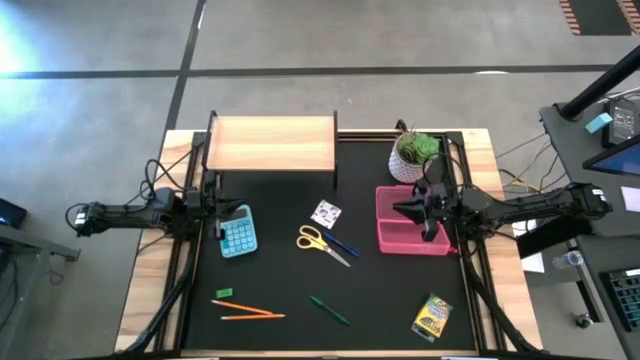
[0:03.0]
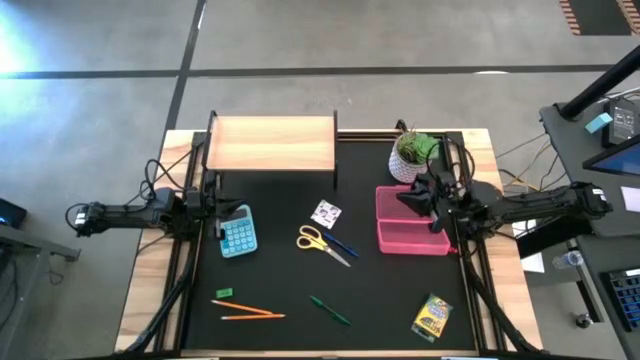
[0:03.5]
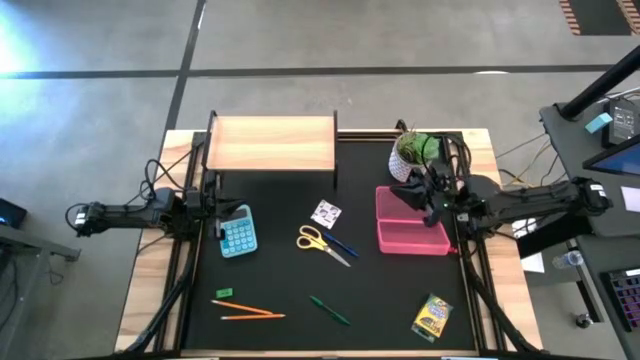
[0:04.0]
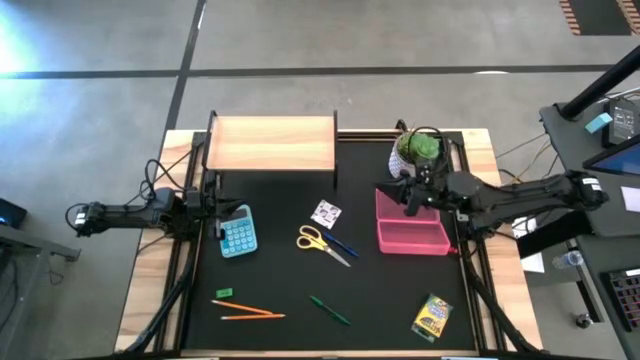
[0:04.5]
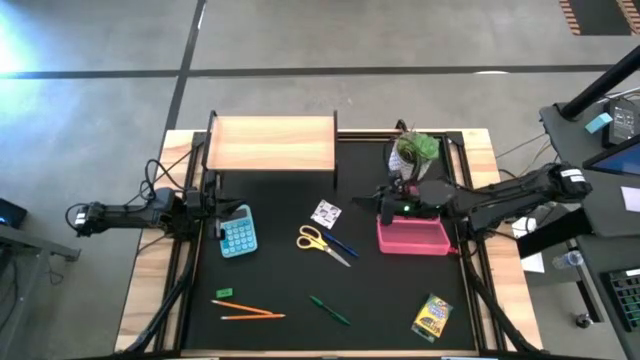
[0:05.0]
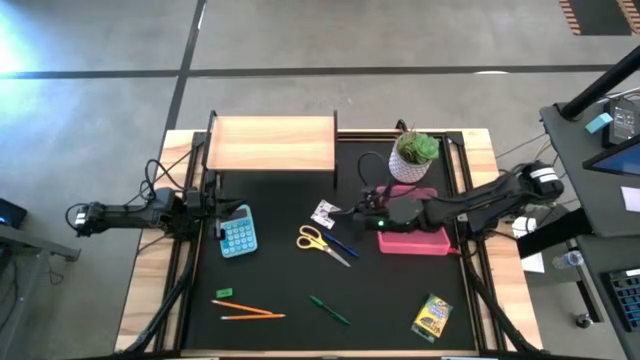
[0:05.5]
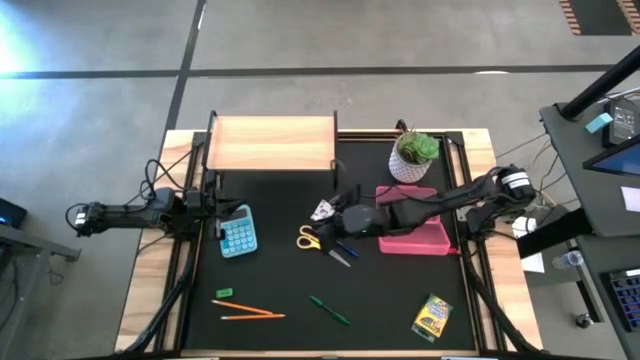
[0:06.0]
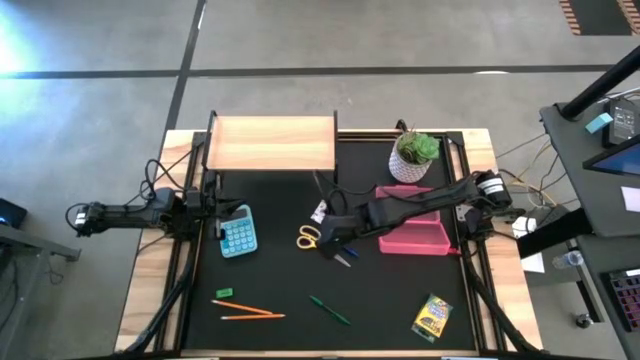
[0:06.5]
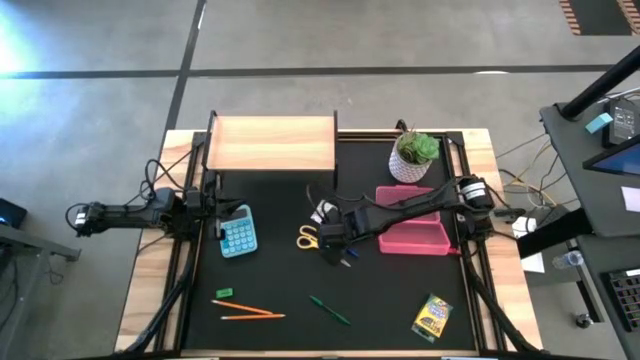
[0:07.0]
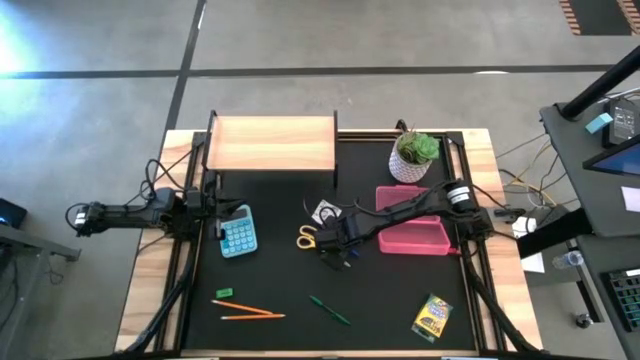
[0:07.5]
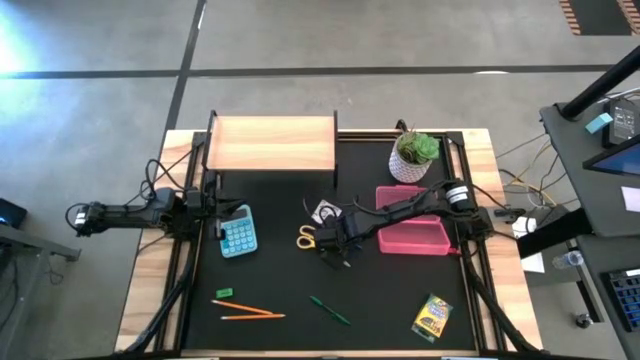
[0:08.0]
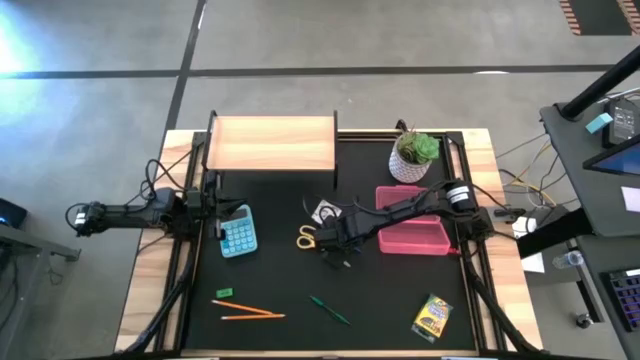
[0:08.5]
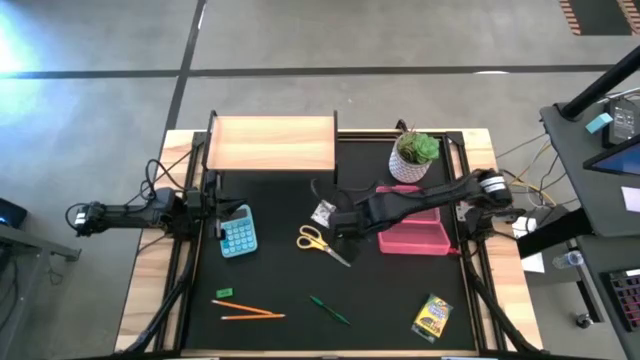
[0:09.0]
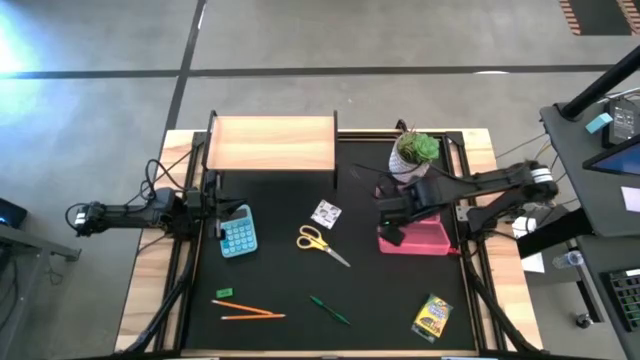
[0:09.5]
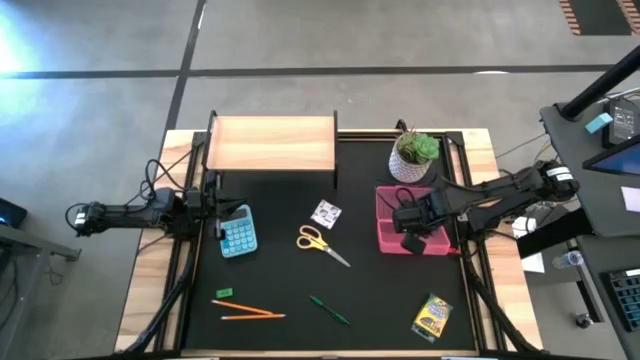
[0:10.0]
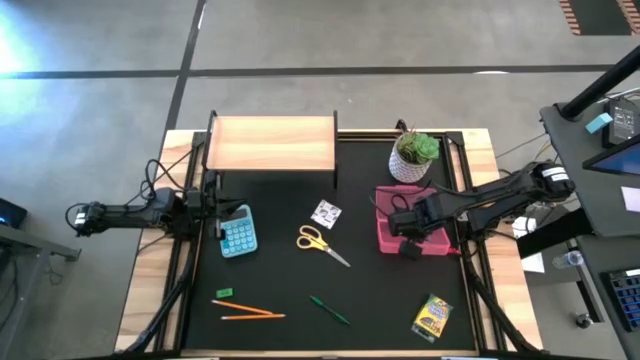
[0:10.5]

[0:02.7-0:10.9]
Task: Pack school essentials
Put the blue pen into the pink case

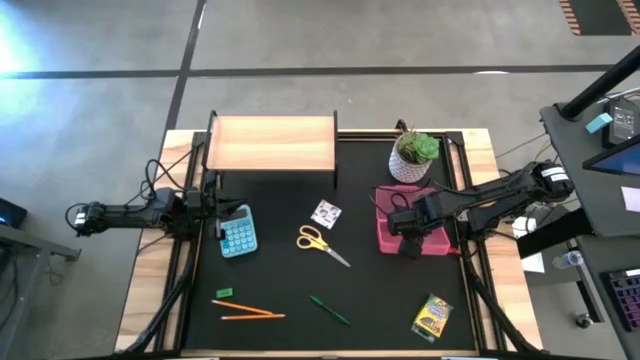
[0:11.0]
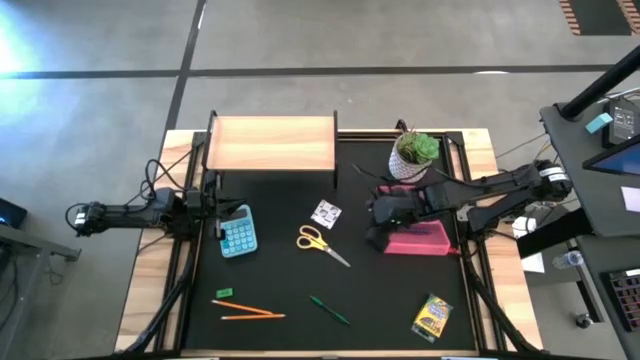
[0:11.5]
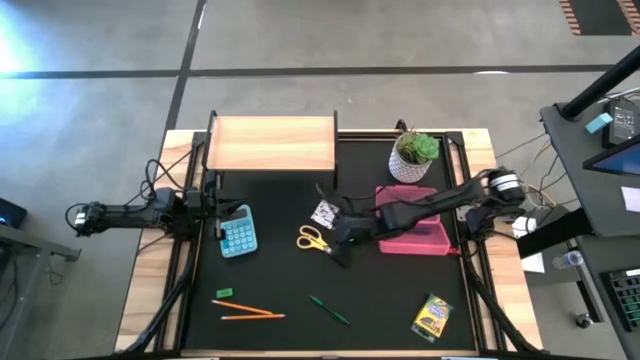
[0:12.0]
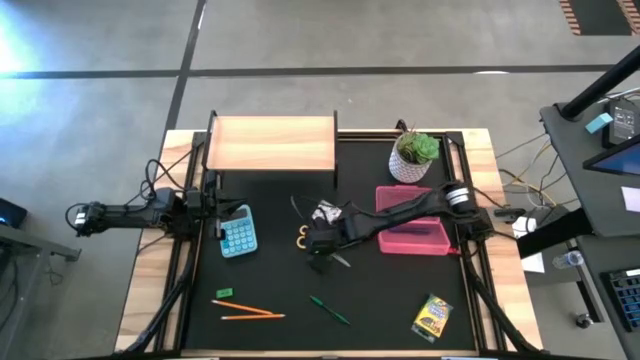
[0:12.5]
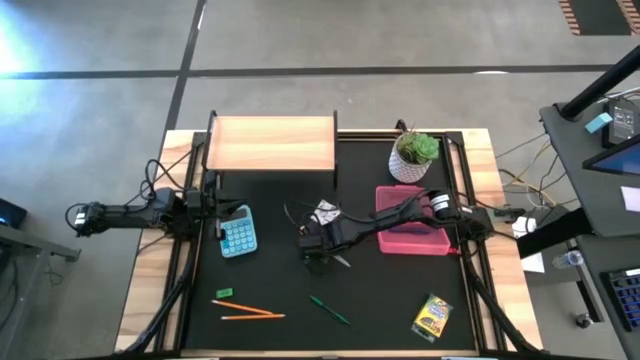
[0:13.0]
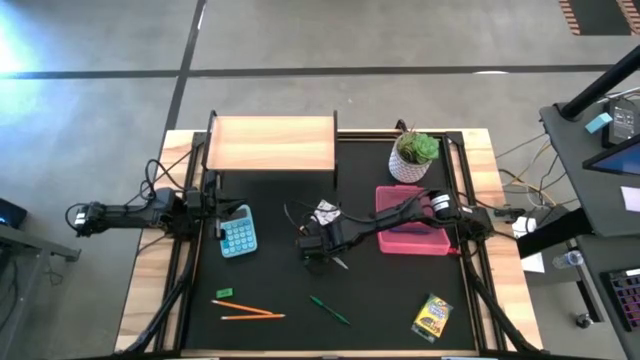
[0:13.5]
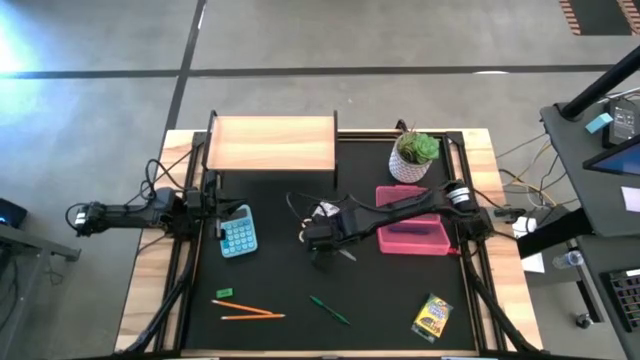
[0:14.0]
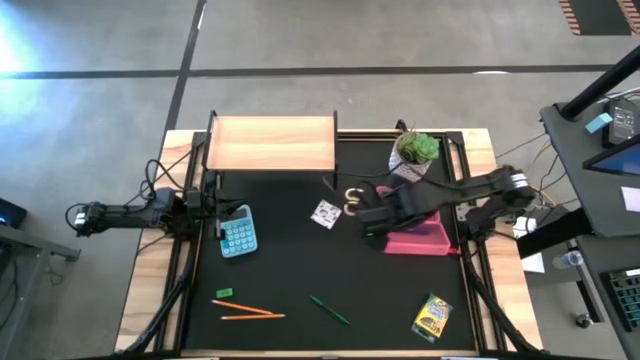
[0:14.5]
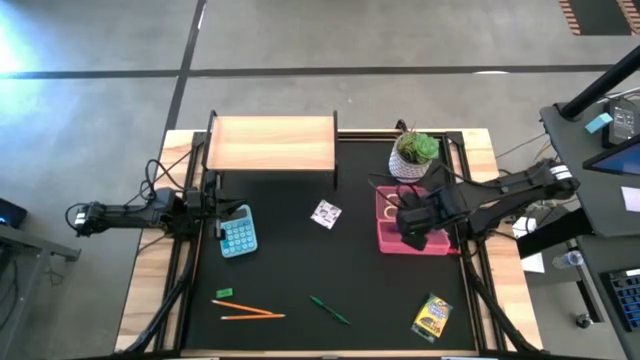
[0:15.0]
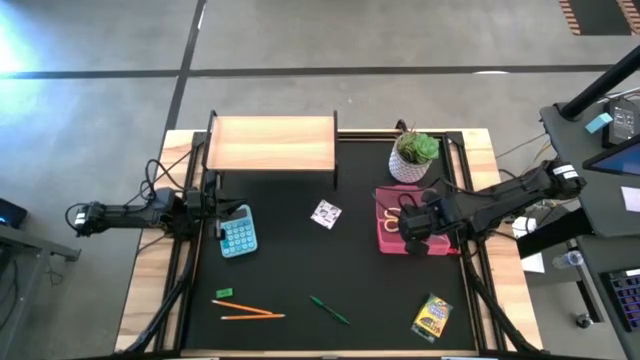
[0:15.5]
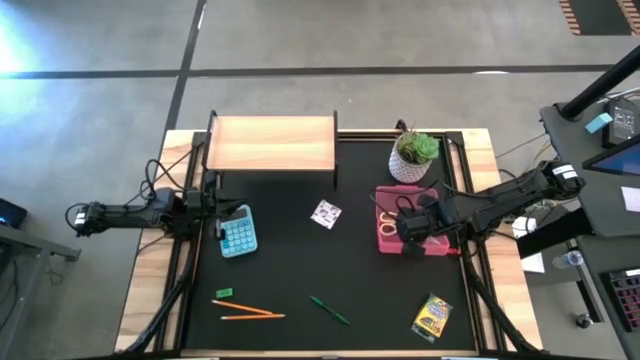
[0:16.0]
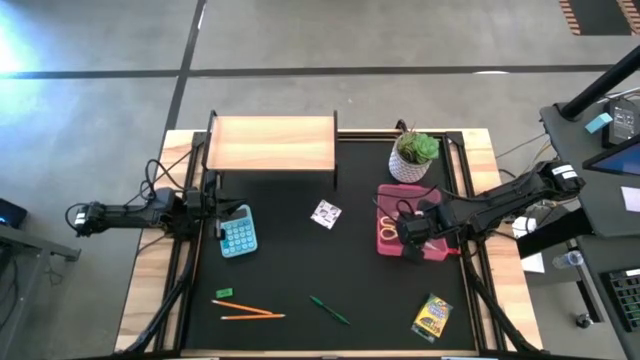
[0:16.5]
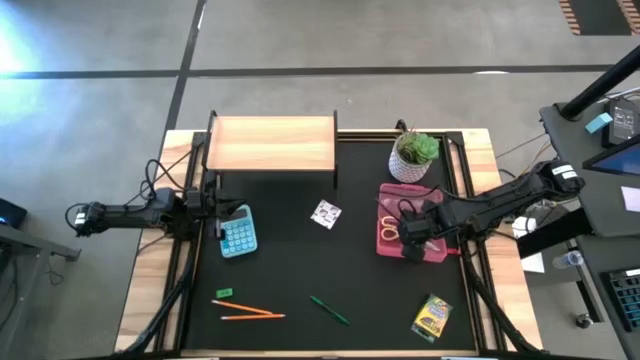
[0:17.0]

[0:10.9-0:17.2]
Put the yellow scissor into the pink case

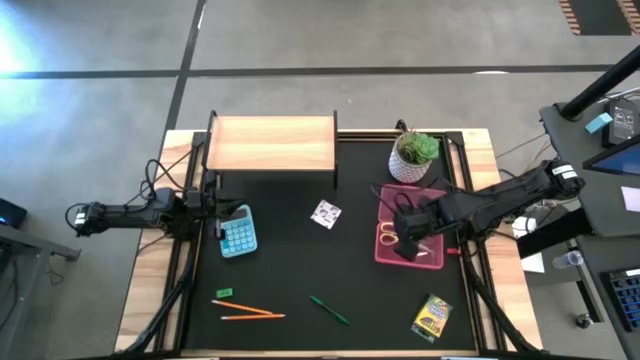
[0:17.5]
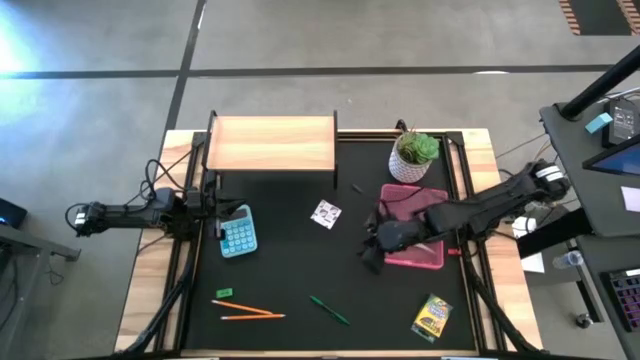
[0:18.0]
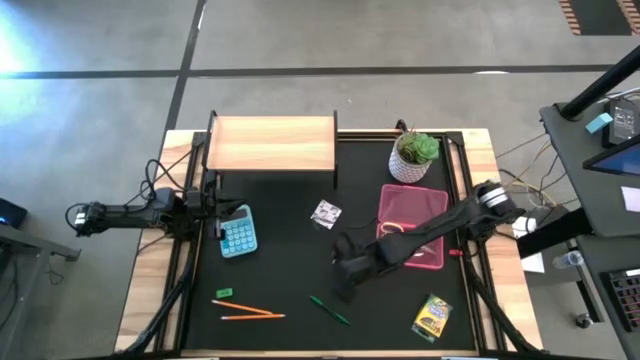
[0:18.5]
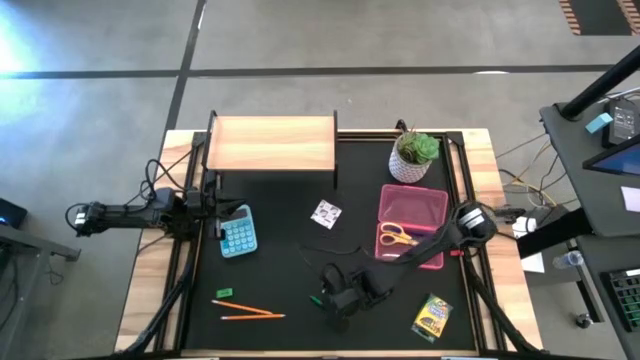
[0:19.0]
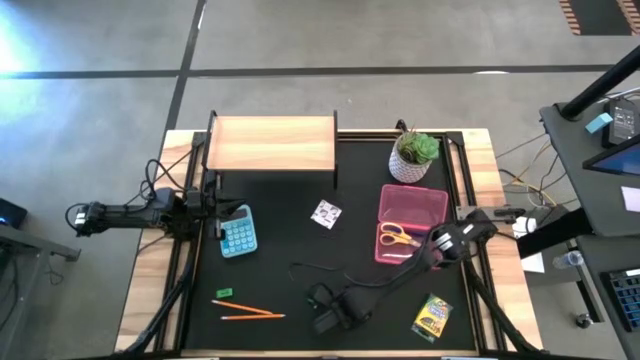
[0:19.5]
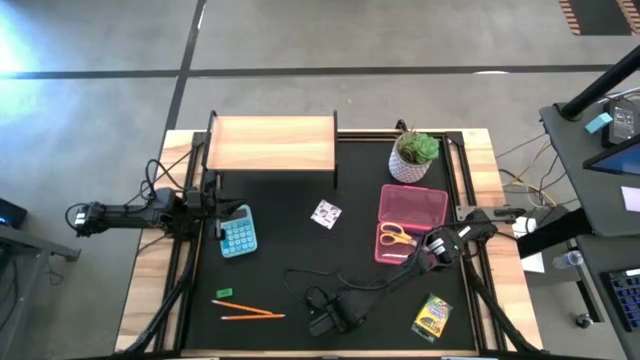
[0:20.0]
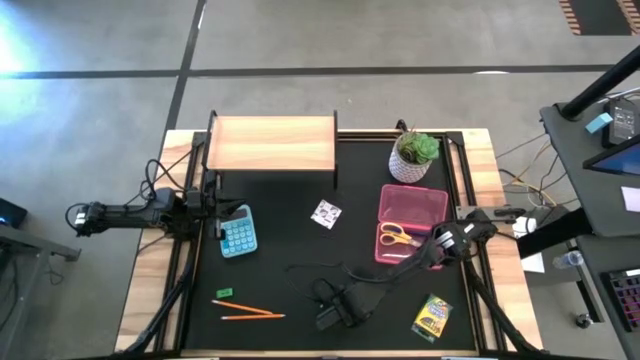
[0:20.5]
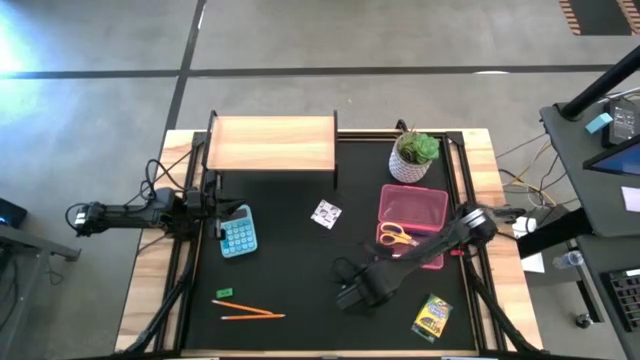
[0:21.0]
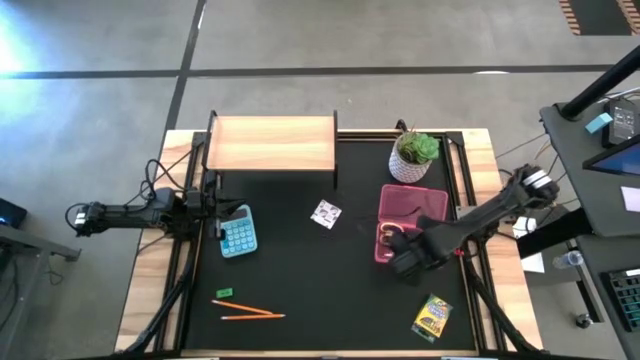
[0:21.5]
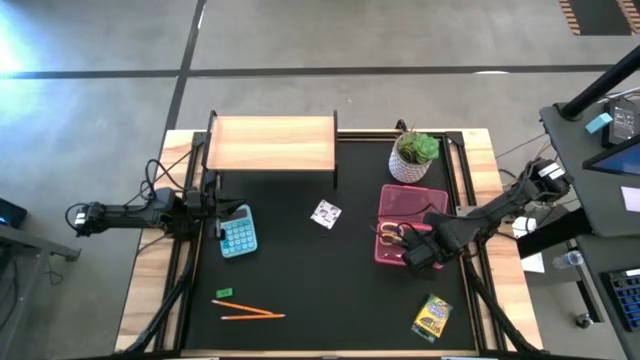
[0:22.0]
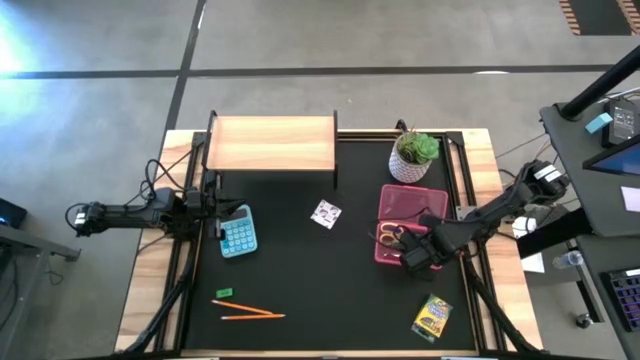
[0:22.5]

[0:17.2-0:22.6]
Put the green pen into the pink case

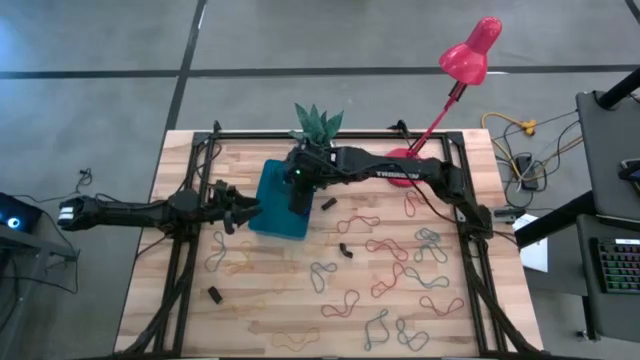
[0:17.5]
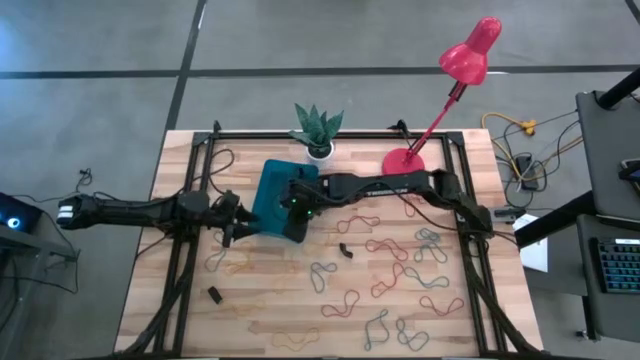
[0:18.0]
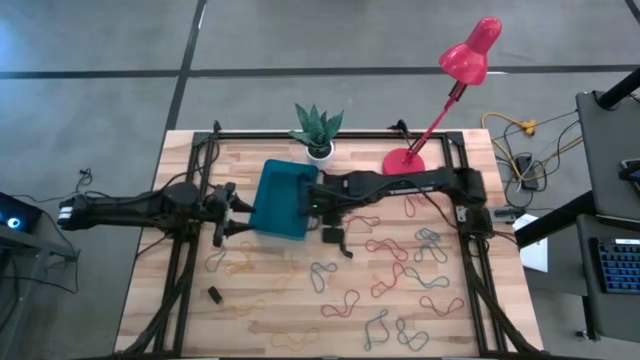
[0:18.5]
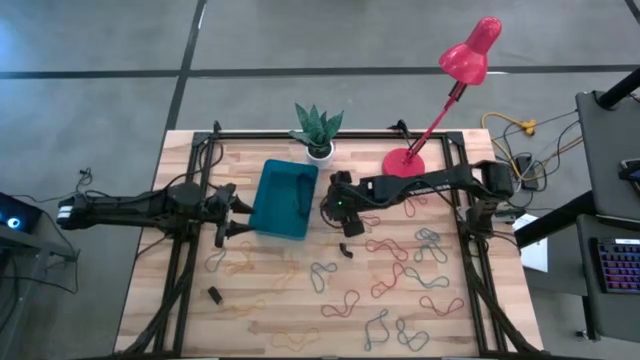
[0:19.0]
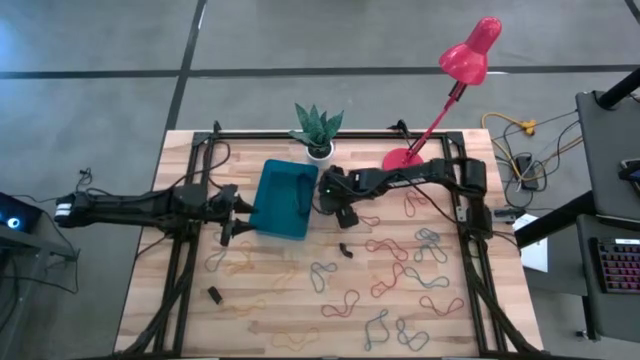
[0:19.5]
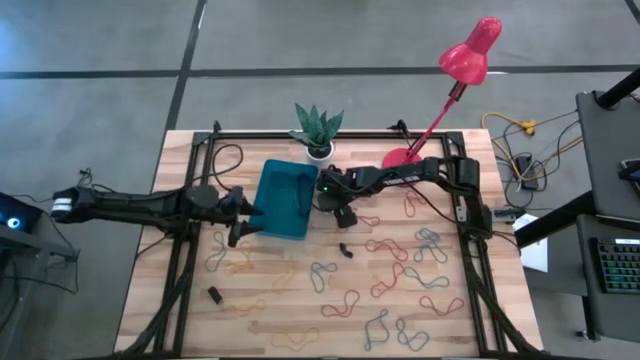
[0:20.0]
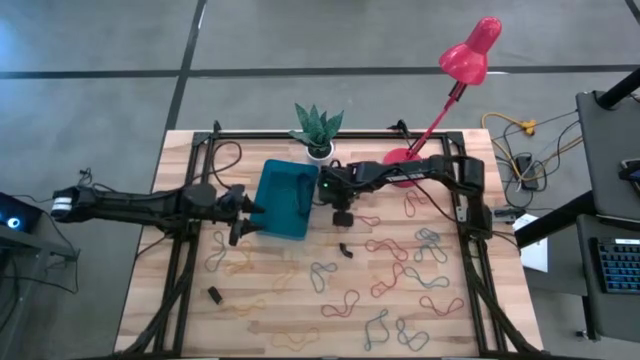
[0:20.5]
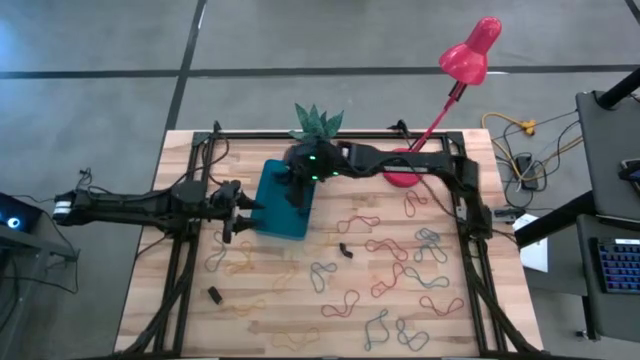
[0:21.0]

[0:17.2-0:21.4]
Task: Pick and place rubber bands into bin
Put the black rubber band into the blue bin
